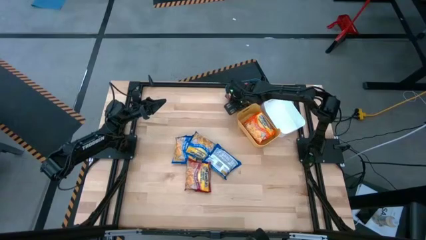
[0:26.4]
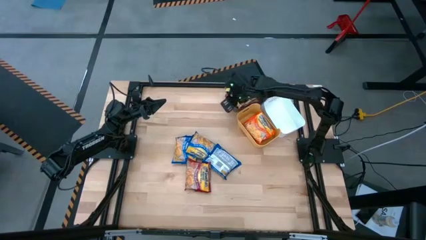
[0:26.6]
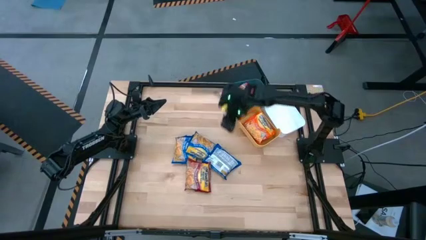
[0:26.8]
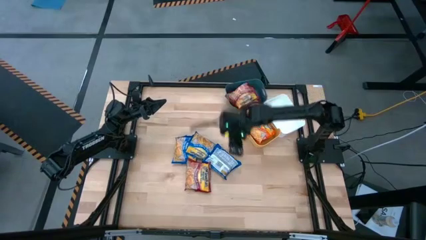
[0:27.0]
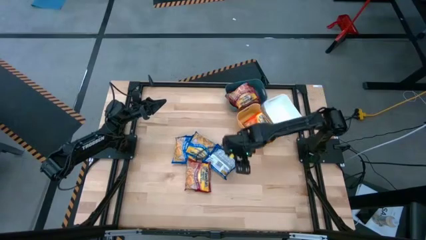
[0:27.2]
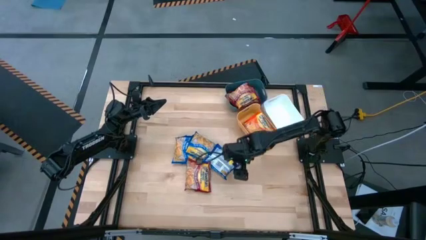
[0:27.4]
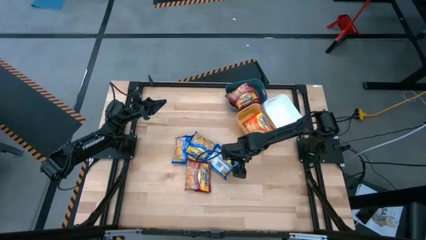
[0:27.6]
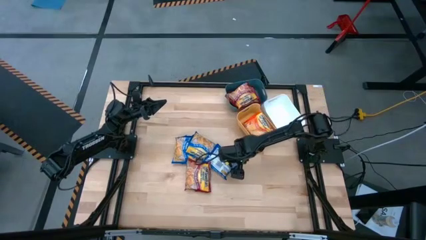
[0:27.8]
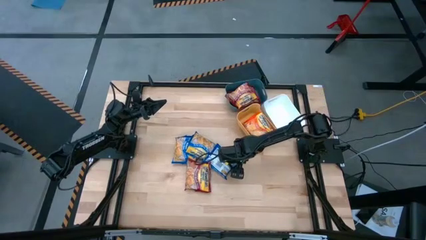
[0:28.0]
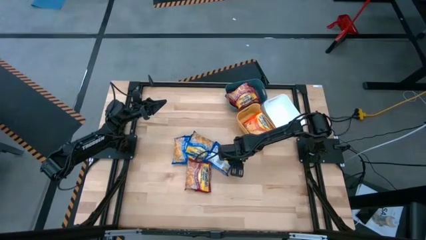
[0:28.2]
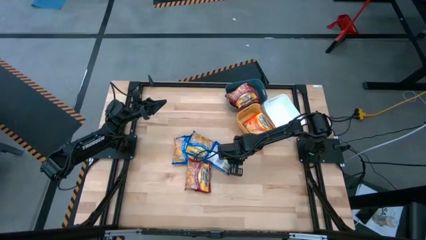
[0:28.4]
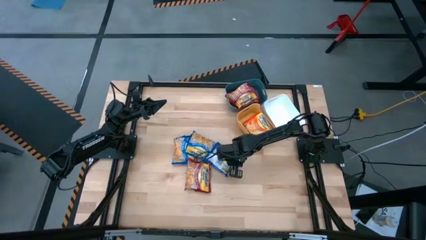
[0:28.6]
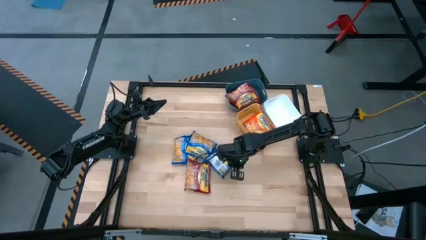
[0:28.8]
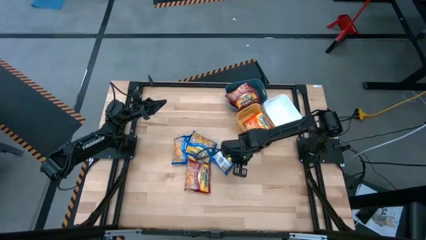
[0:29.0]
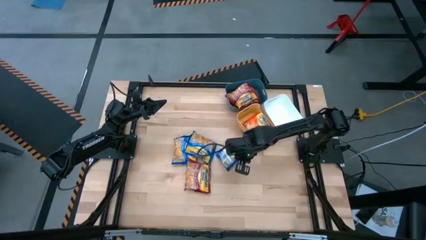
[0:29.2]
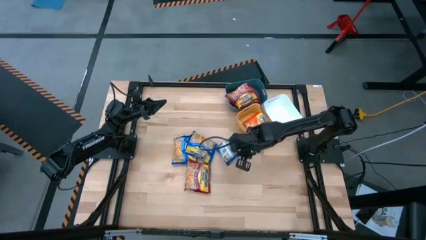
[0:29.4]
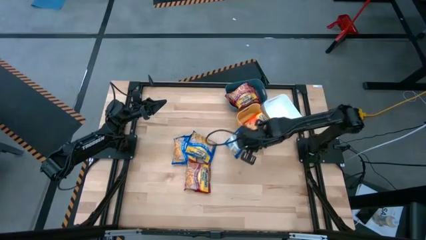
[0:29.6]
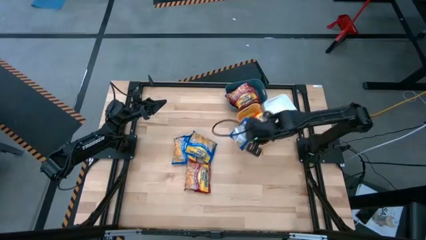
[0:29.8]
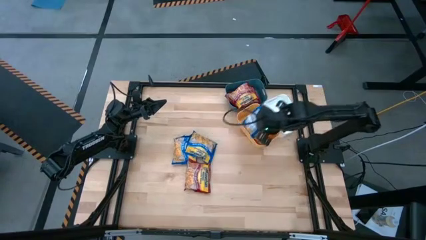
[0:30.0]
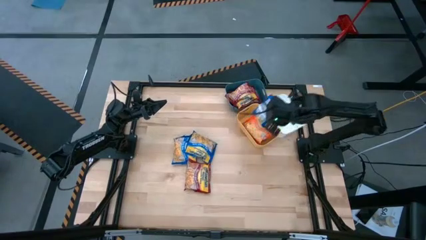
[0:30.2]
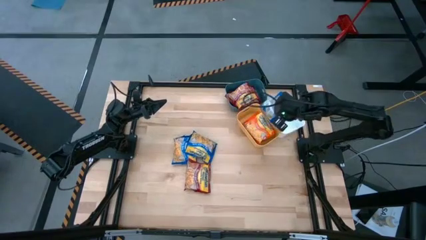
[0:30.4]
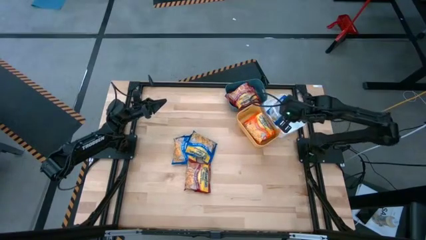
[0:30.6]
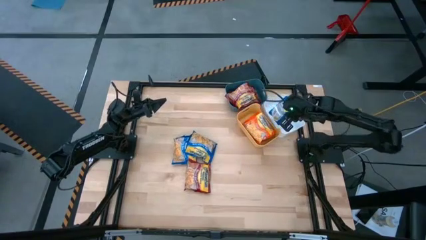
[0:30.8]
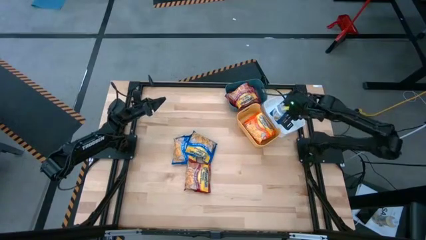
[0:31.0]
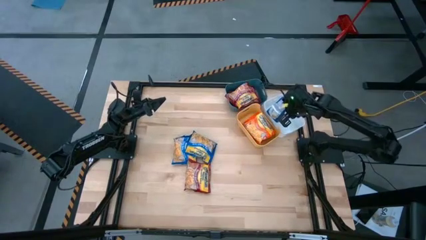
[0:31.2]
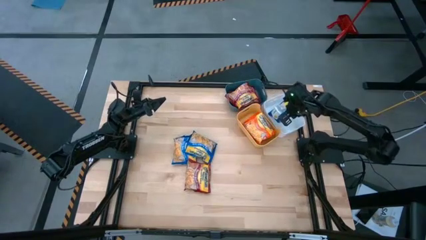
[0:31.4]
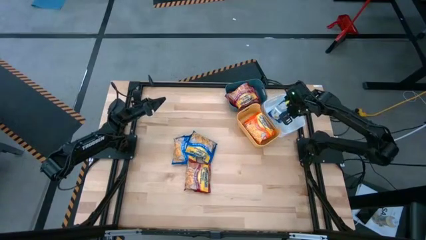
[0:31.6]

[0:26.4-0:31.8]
Task: Sort Maruchan noodles
Put the right blue noodle pack into the white bin

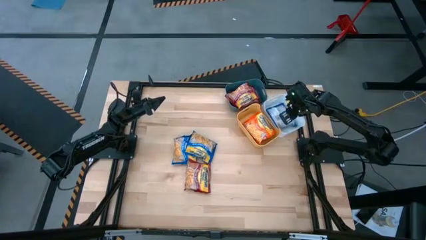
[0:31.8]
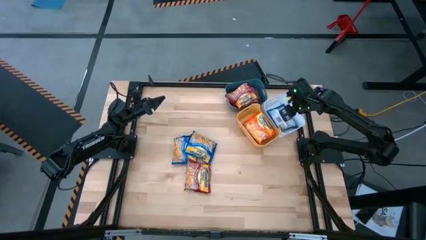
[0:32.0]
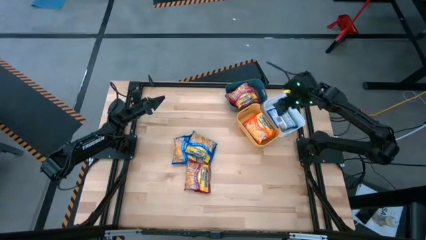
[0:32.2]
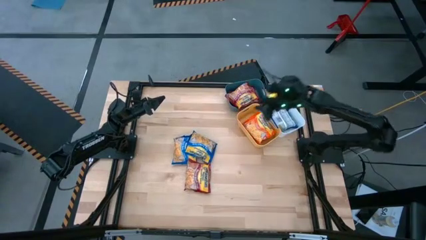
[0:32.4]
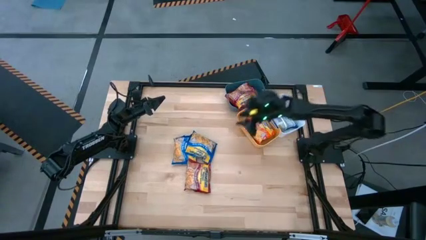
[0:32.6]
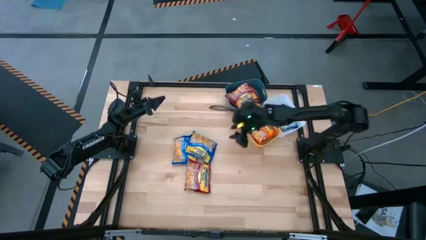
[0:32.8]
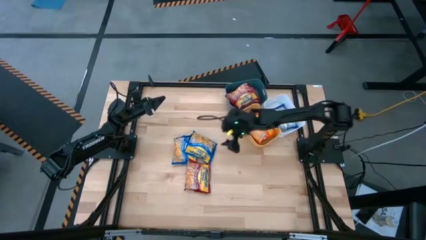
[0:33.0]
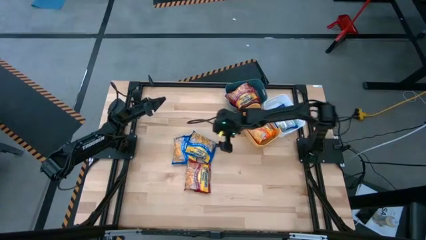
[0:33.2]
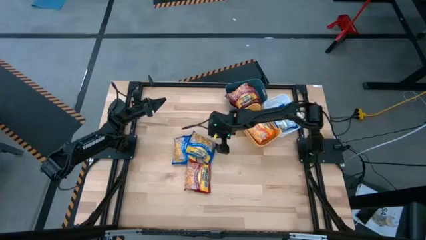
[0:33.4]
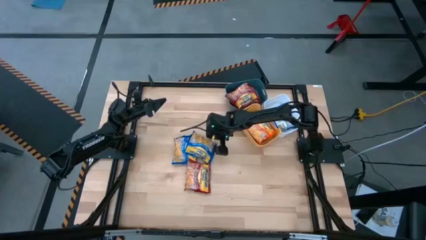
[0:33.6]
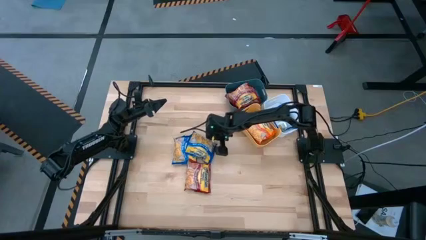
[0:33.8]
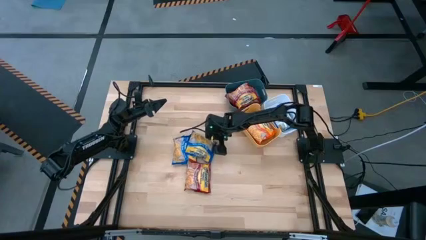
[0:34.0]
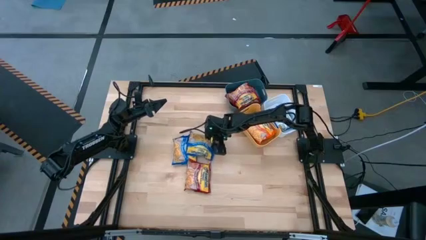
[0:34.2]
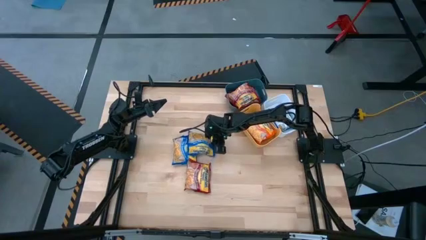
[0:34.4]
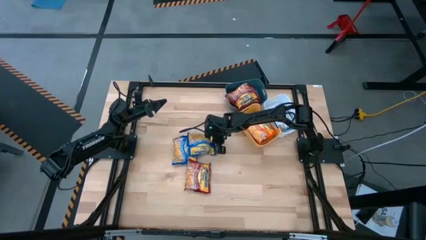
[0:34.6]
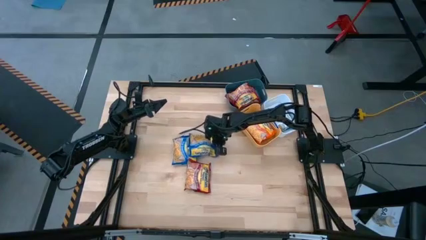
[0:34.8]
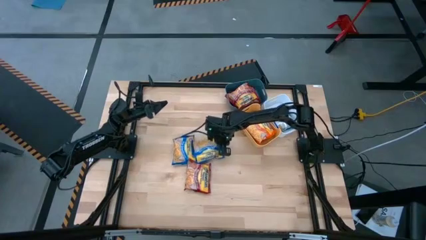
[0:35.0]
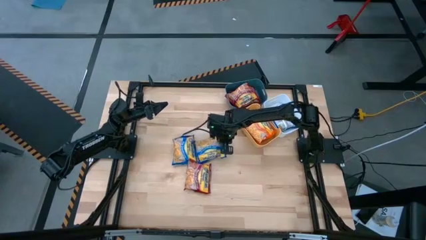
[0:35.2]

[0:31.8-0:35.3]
Put the right blue noodle pack into the white bin

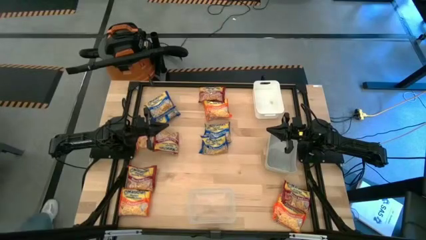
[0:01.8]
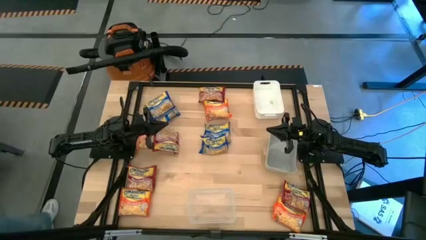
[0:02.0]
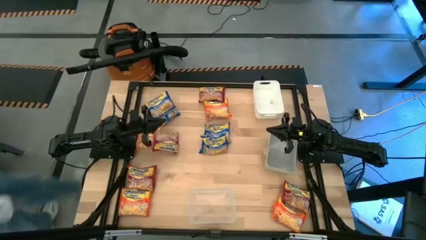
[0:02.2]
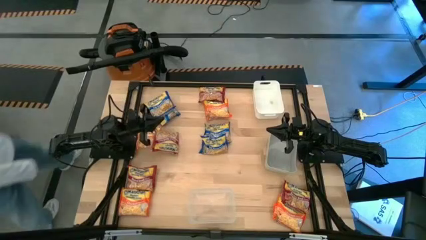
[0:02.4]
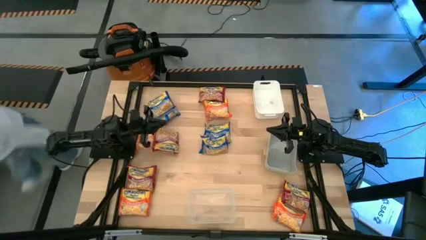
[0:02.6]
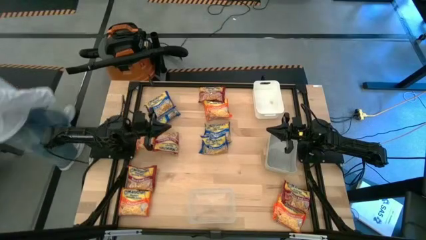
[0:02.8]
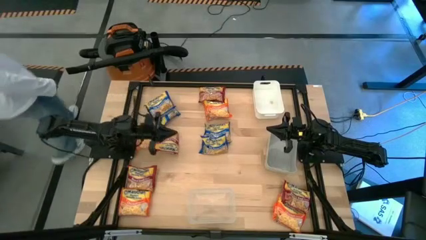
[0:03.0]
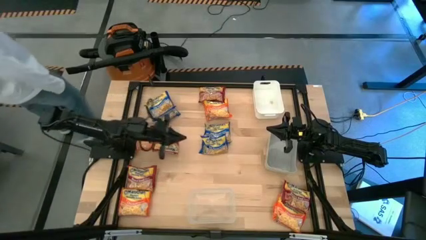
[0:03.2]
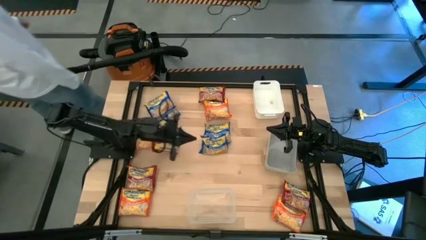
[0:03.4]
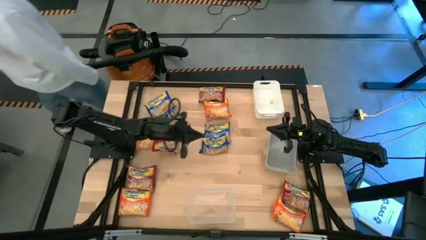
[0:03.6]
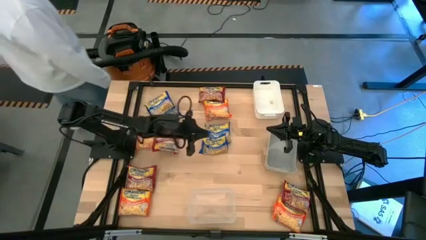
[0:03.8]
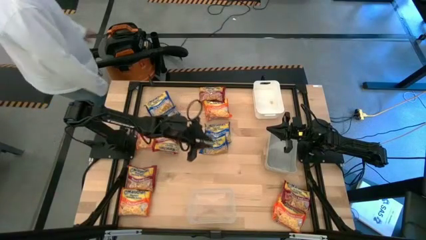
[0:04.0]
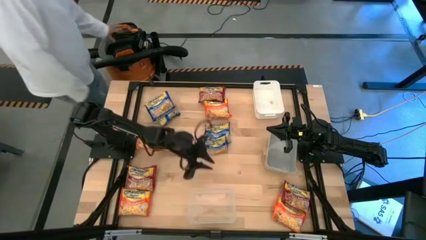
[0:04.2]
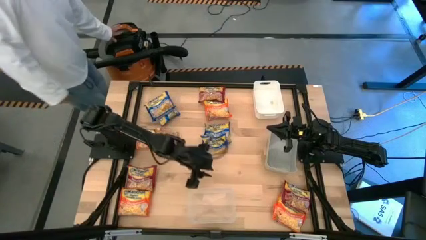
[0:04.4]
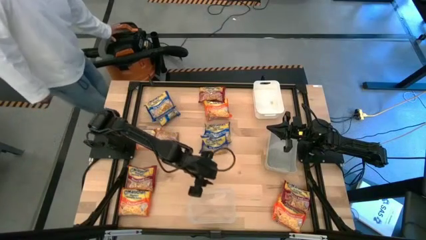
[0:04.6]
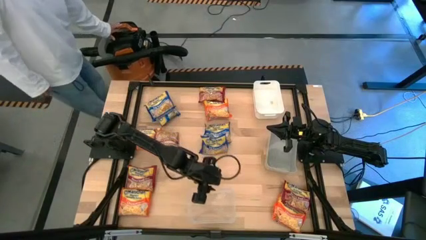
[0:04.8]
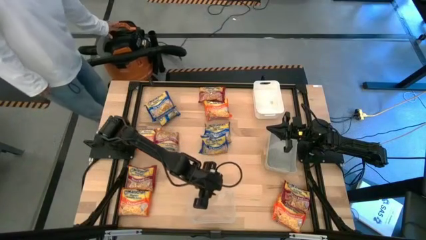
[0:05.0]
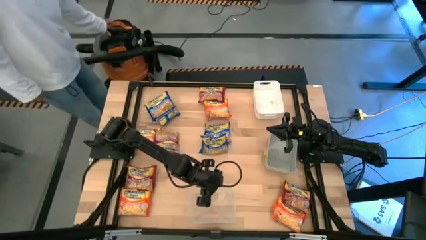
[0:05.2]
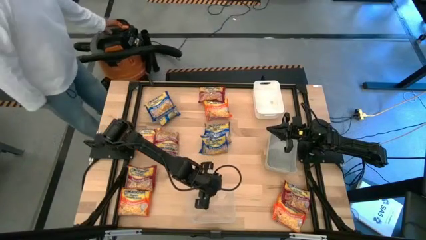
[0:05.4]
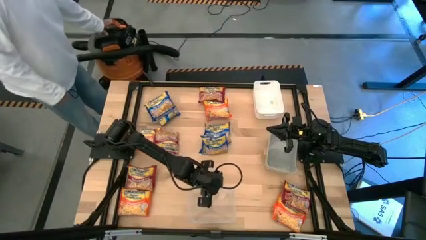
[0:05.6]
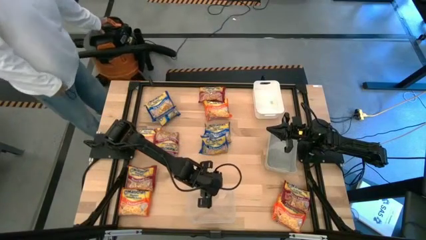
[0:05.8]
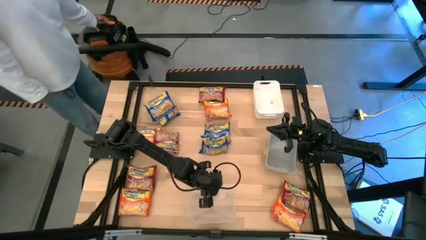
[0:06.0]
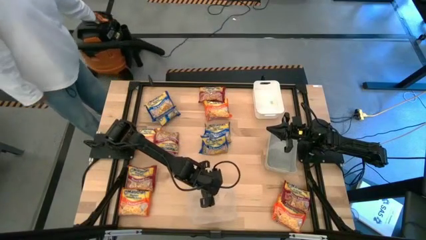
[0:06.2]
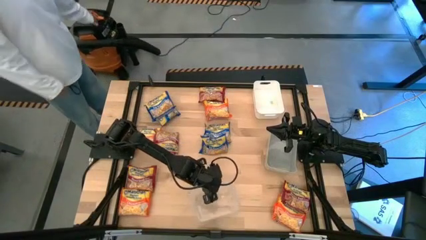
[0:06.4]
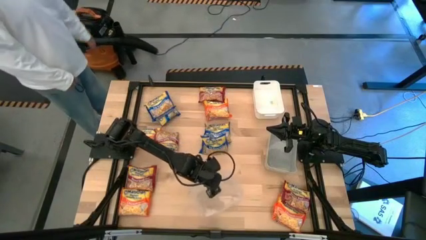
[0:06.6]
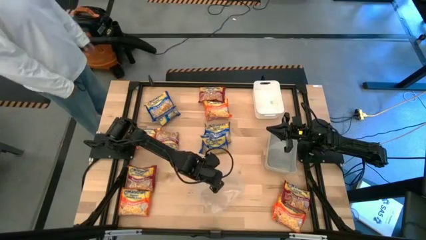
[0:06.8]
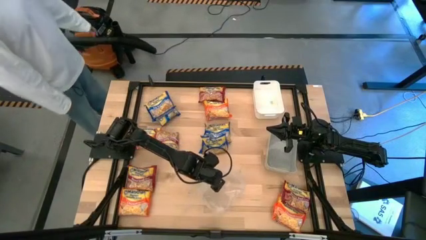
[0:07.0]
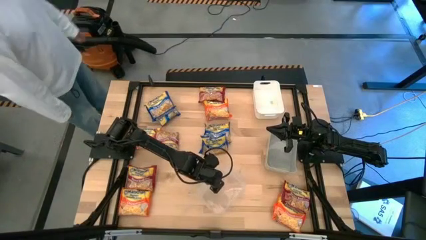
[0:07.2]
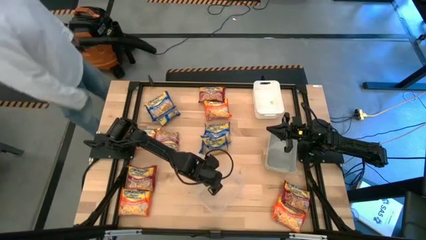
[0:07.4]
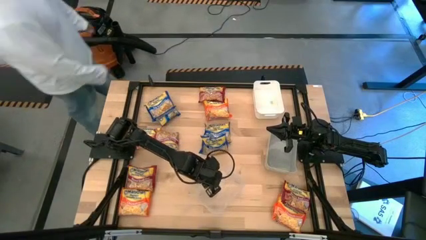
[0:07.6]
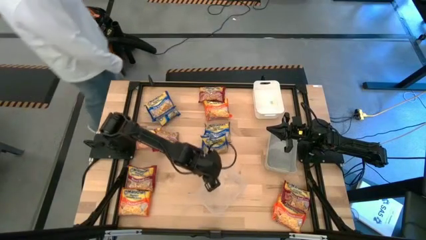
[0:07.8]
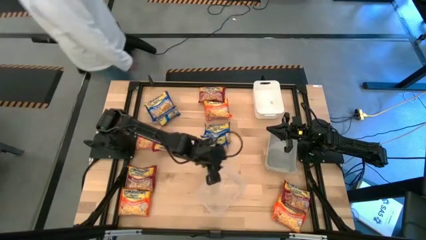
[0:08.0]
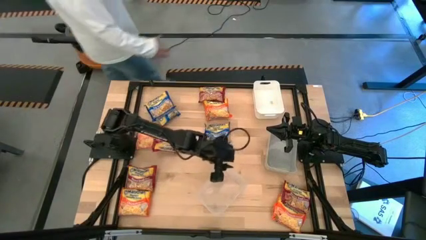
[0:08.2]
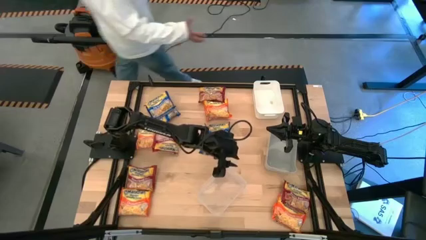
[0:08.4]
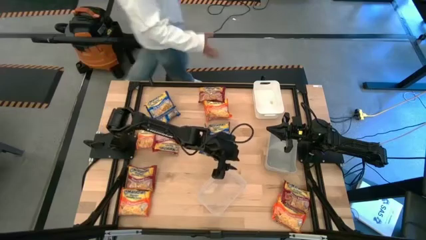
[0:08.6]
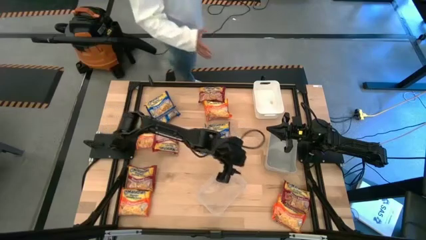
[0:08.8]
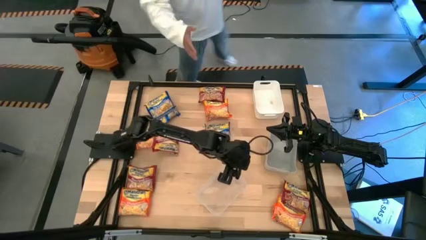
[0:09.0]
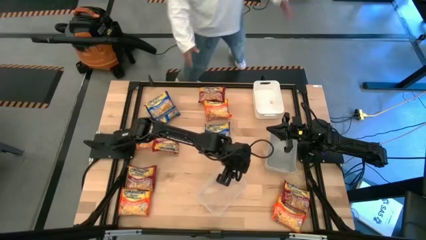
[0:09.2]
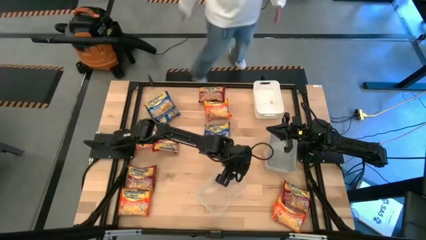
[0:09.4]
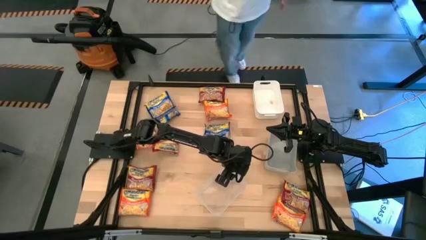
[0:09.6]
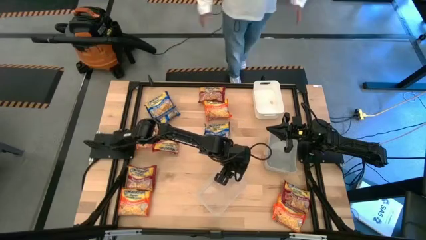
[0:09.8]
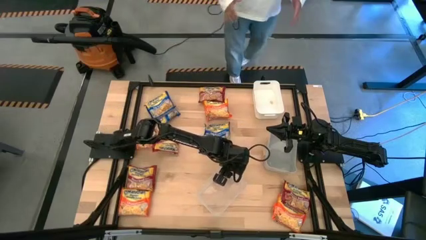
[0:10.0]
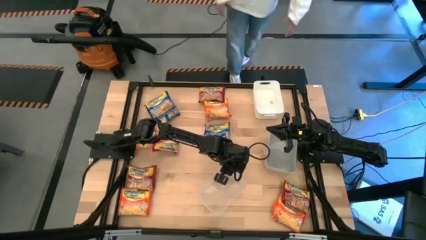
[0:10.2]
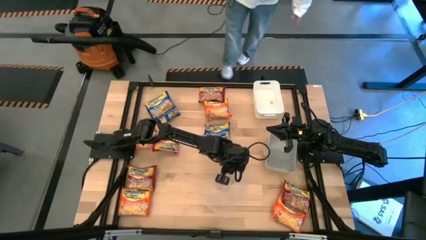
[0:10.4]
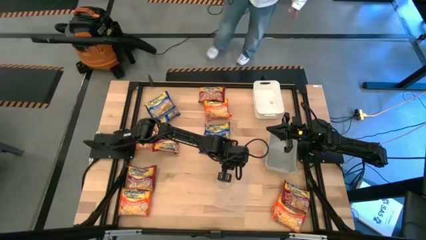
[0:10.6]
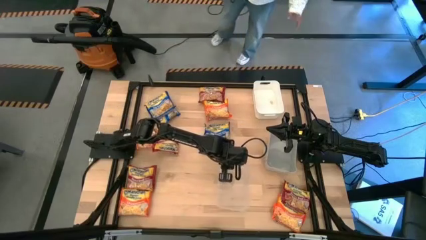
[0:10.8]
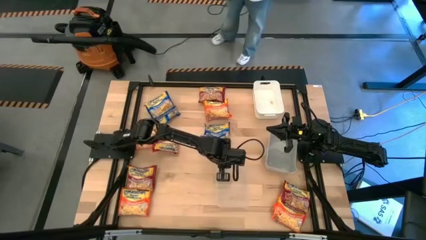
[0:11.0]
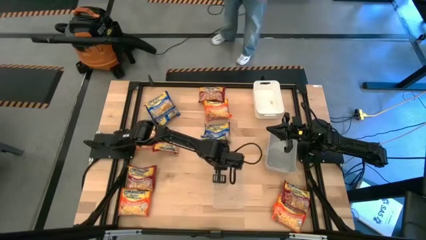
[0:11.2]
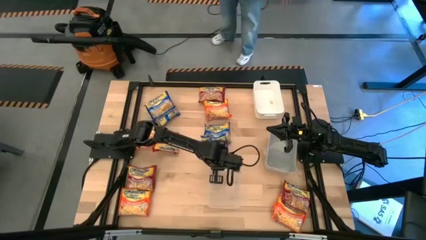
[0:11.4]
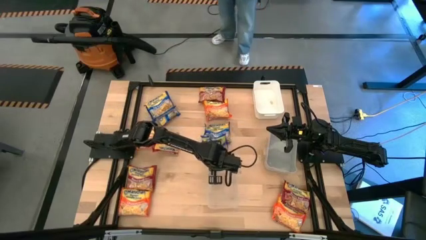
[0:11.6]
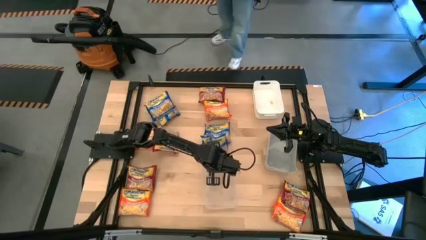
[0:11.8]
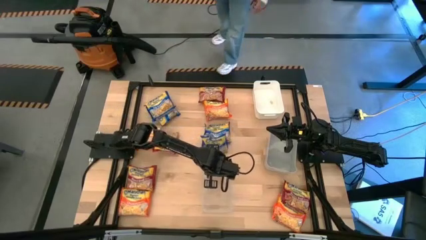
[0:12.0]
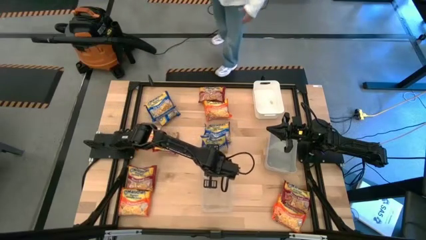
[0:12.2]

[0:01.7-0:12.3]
Task: Sort Maruchan noodles
Adjust the transparent bin
